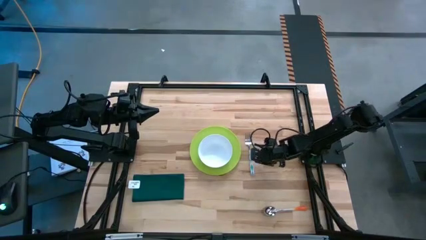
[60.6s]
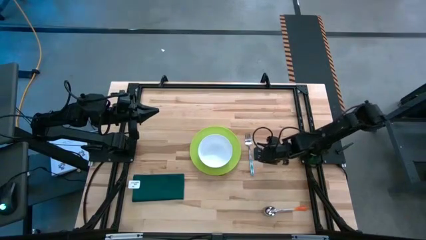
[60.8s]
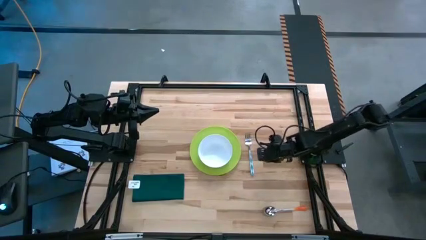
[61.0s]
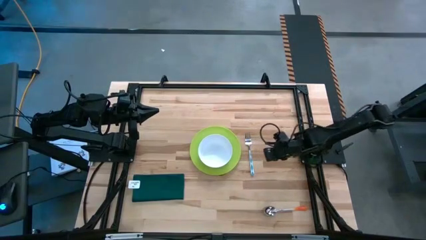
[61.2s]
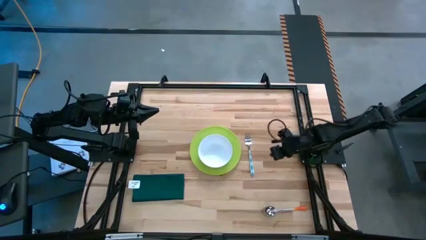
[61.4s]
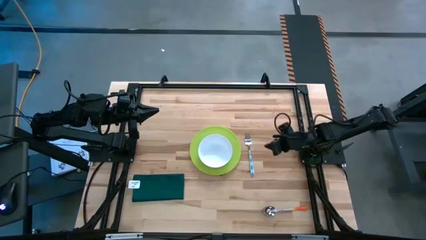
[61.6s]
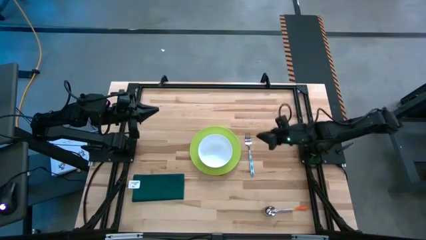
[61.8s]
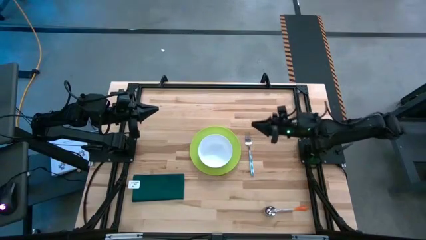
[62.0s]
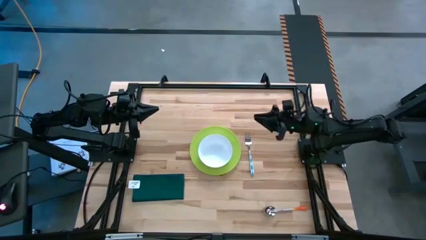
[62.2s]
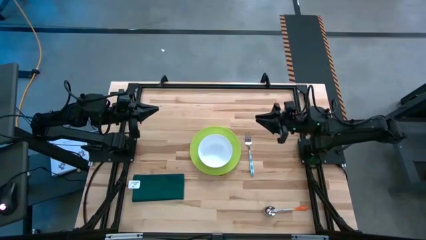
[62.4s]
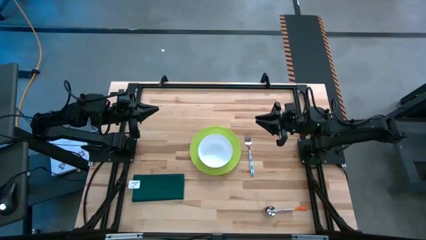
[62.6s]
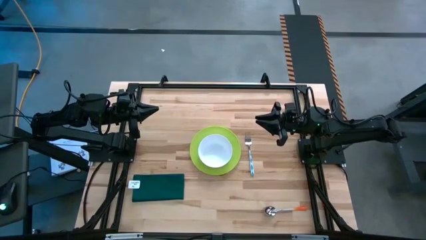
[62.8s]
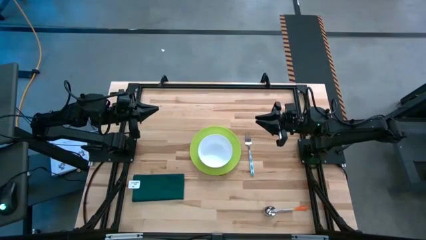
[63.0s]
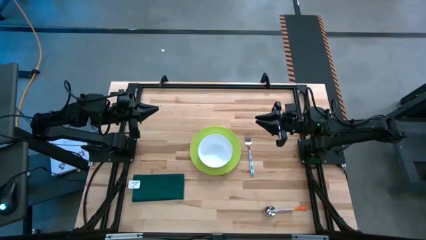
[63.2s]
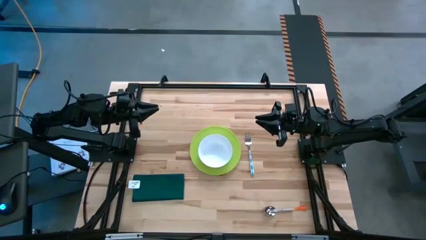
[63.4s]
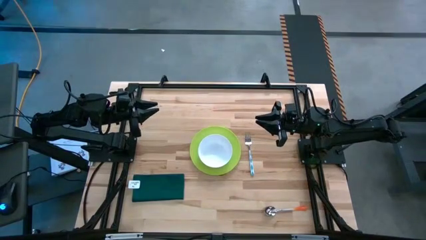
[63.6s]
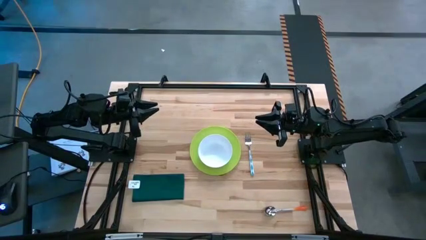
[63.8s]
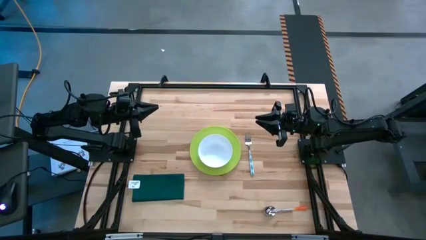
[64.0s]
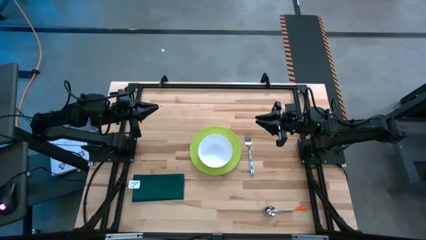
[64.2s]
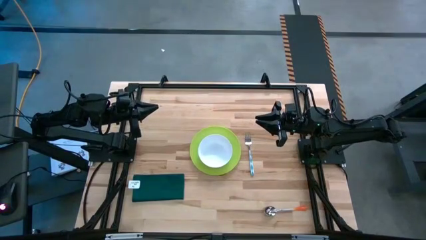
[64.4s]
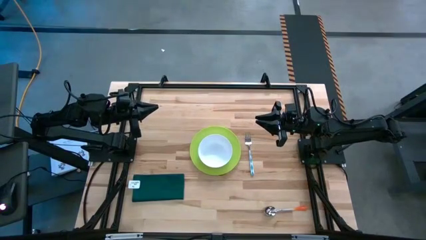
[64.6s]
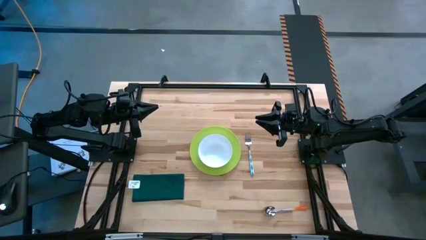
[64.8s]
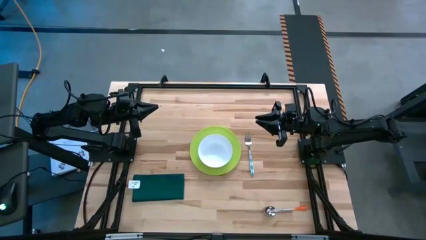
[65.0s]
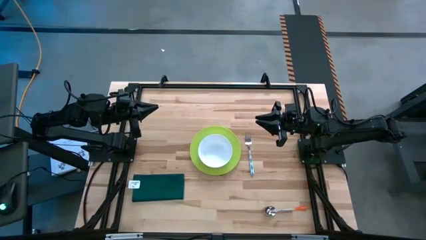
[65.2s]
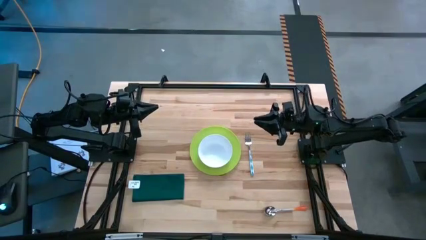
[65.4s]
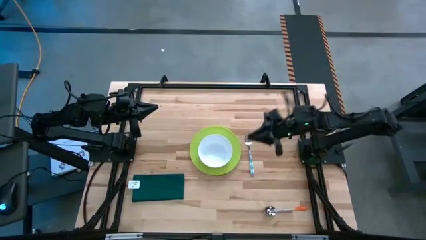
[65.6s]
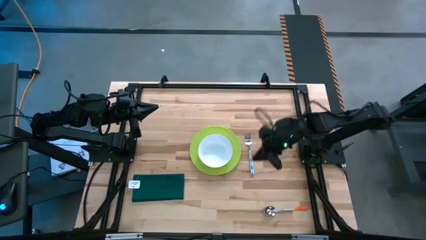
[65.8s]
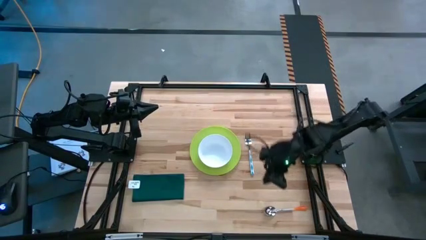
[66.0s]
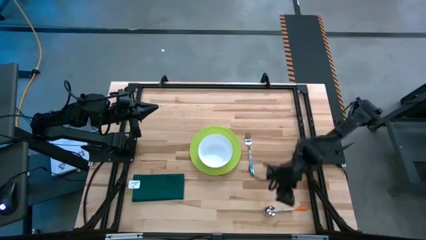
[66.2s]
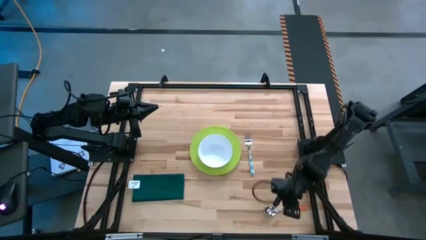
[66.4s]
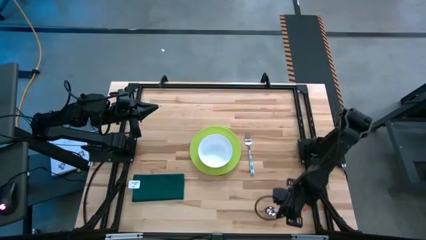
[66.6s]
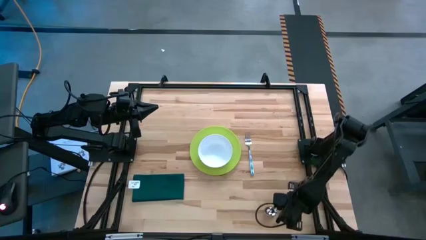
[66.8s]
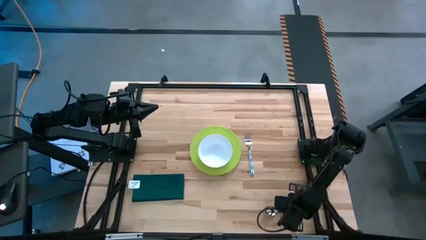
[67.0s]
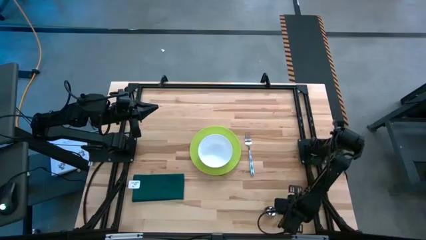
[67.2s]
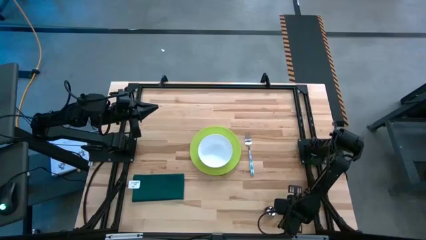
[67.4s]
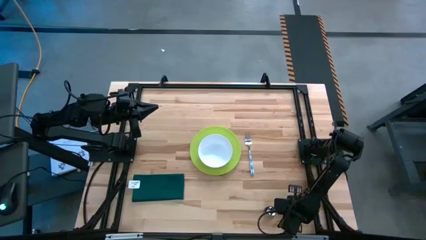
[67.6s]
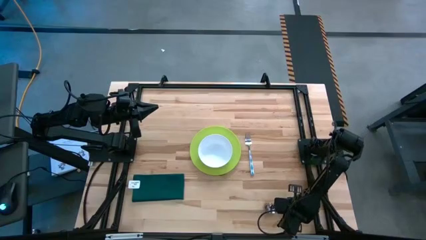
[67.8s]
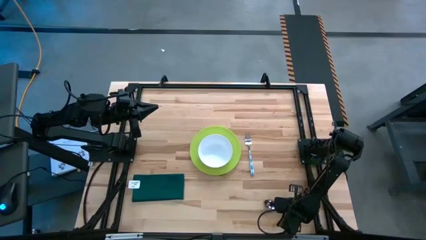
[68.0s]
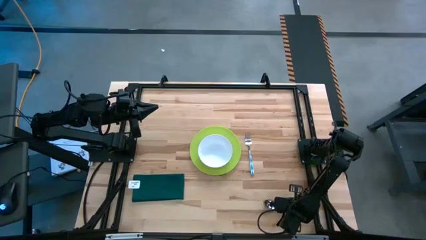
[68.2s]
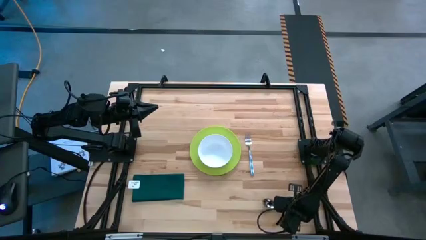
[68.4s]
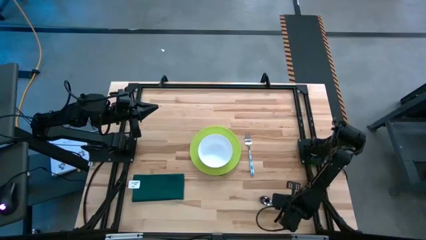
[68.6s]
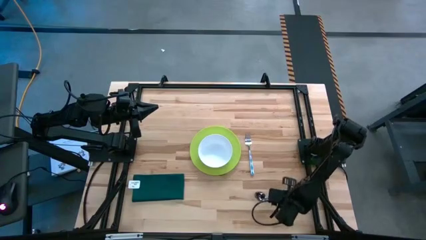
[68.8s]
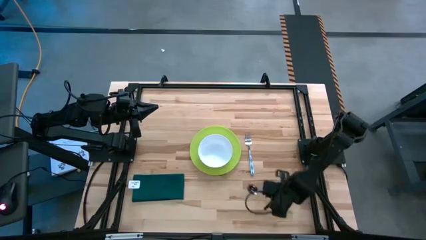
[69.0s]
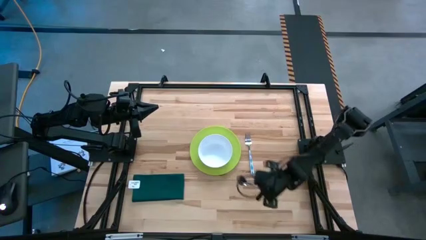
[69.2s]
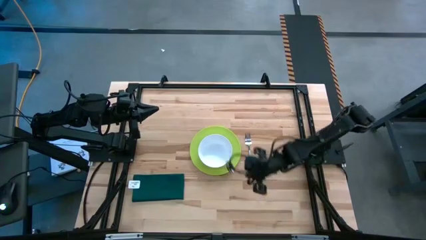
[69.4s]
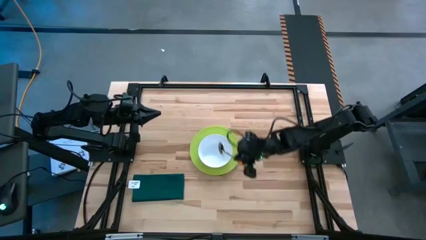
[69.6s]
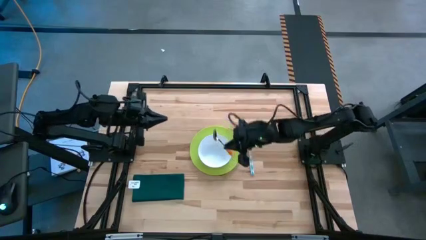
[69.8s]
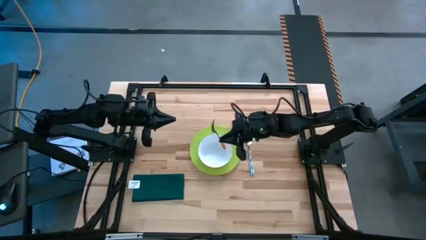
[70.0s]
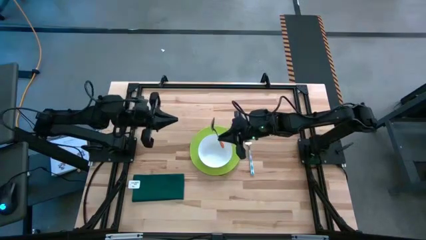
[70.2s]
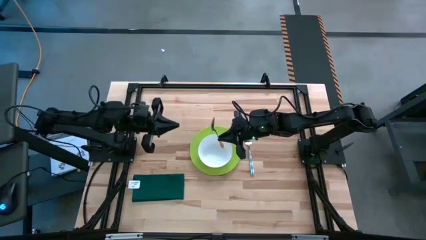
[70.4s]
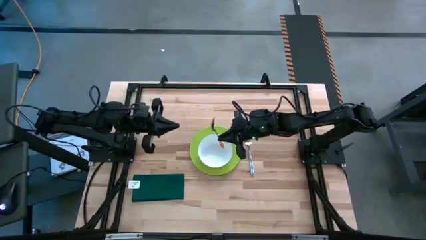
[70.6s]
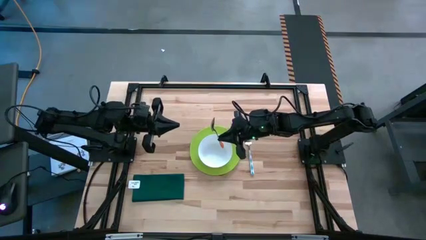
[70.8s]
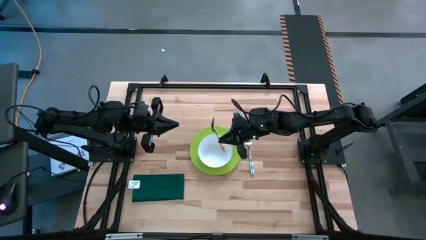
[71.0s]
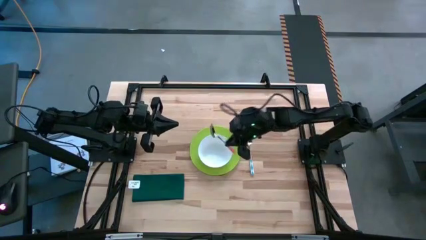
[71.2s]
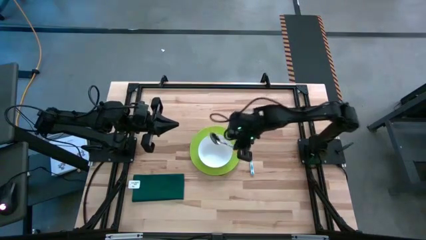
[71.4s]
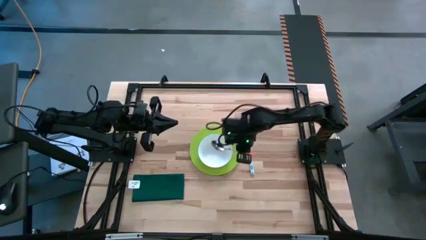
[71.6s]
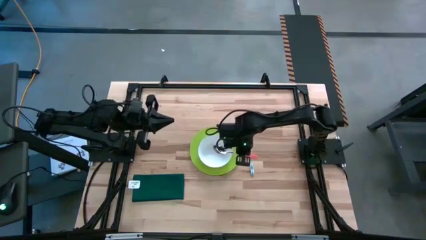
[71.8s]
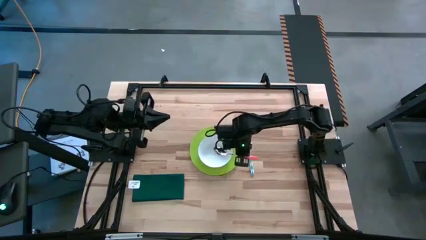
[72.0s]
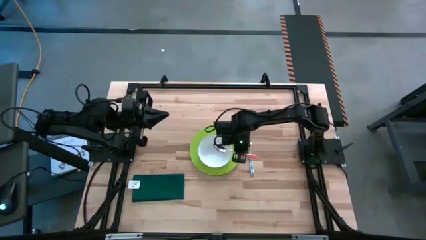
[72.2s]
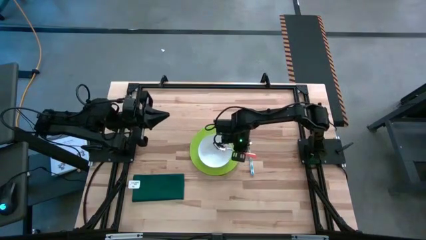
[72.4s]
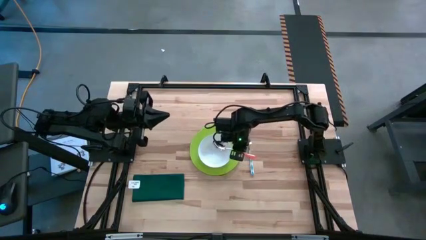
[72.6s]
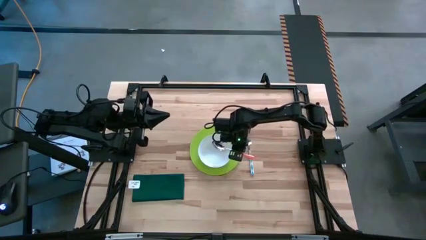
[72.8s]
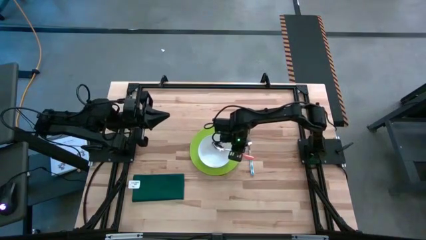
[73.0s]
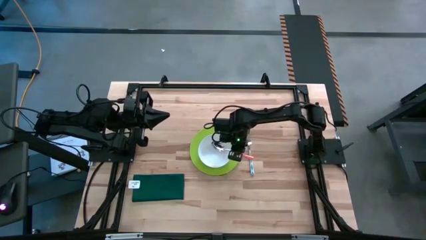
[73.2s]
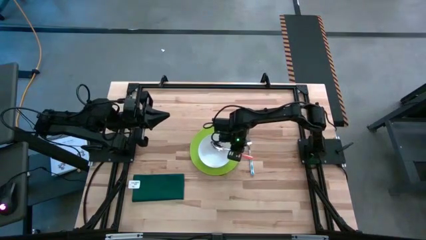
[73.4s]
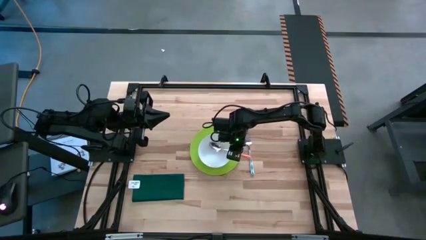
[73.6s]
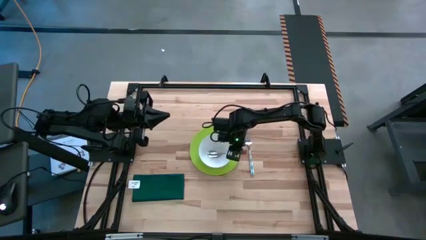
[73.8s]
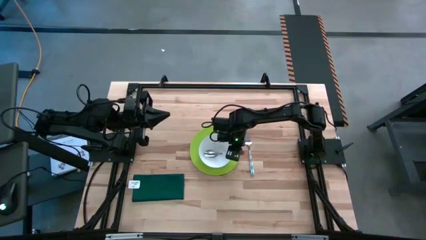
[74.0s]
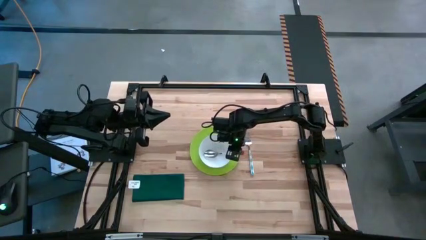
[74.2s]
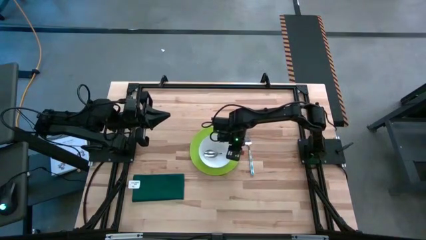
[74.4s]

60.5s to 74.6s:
Task: Set table place
Put the orange spoon into the white bowl

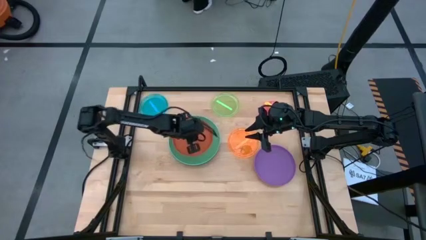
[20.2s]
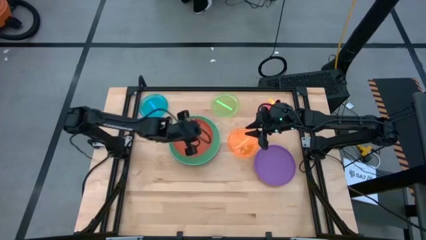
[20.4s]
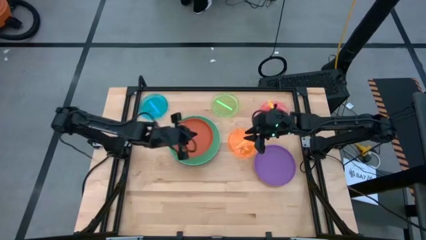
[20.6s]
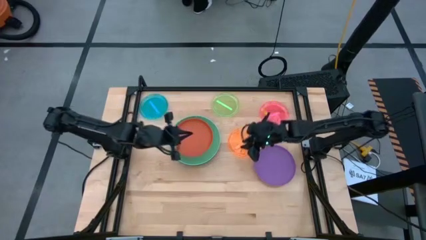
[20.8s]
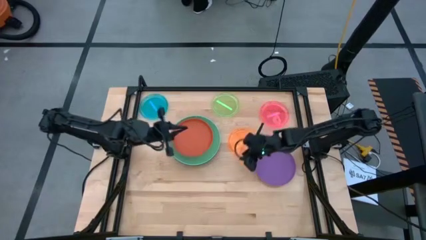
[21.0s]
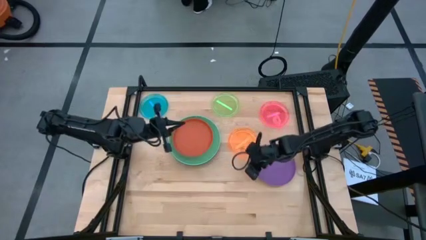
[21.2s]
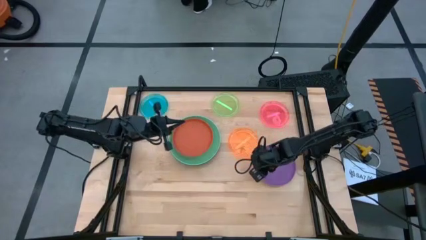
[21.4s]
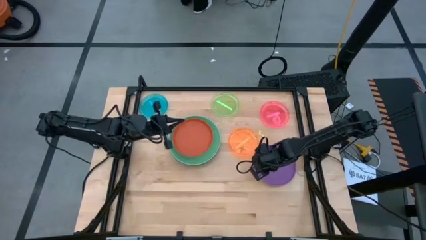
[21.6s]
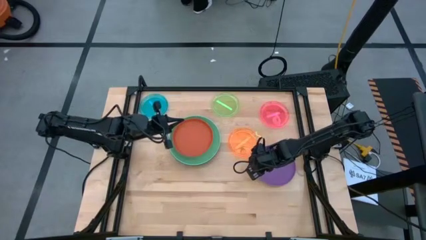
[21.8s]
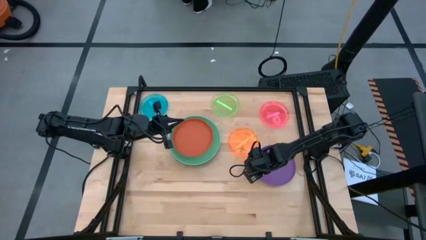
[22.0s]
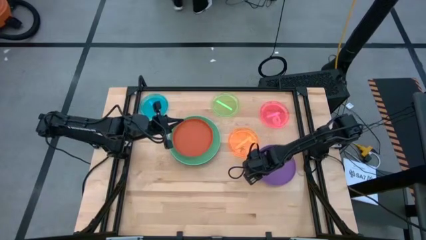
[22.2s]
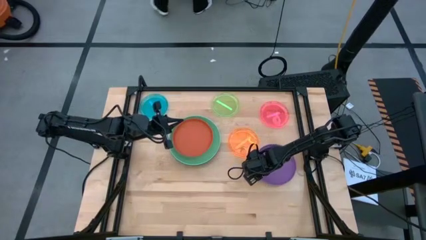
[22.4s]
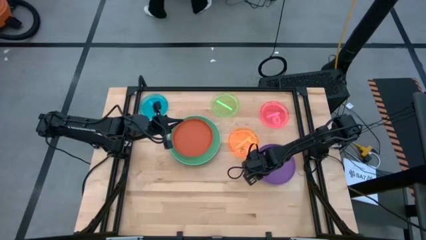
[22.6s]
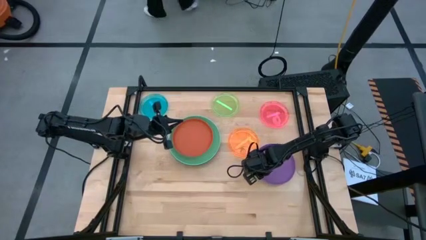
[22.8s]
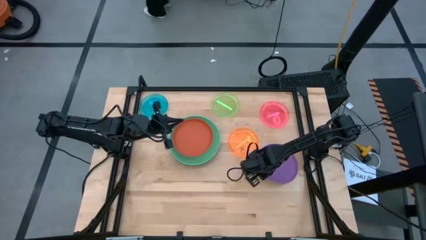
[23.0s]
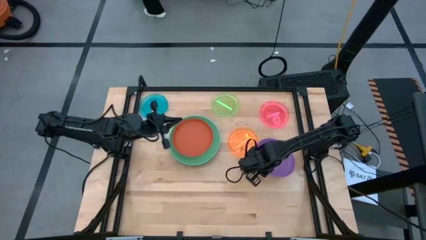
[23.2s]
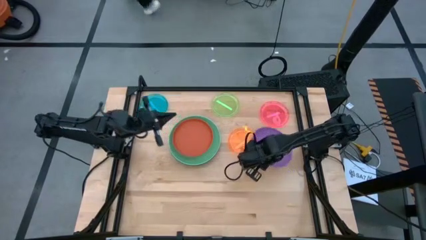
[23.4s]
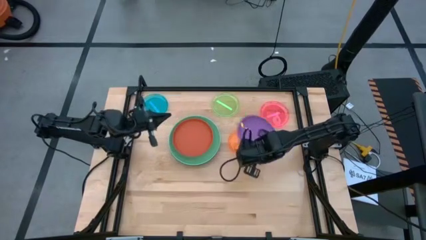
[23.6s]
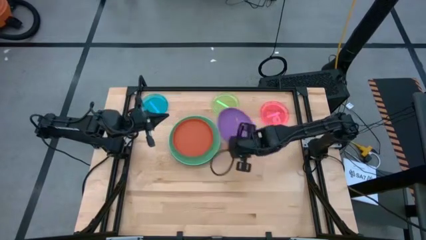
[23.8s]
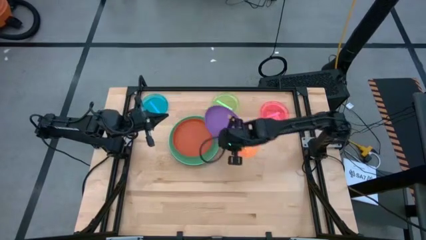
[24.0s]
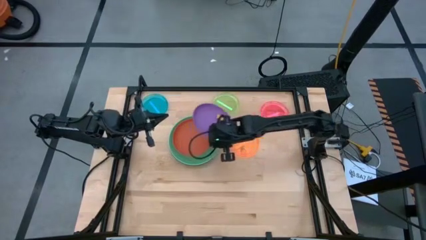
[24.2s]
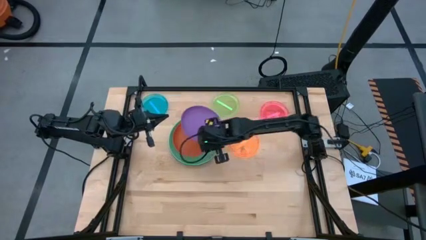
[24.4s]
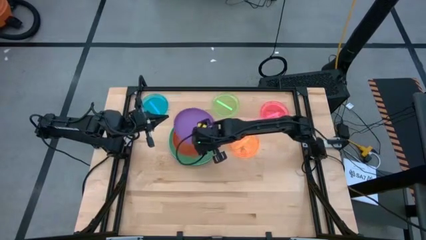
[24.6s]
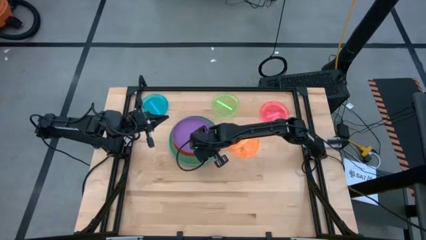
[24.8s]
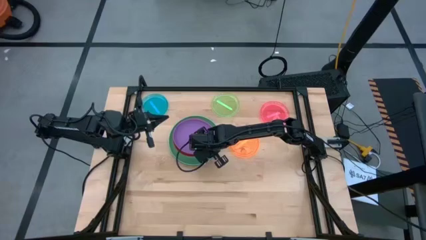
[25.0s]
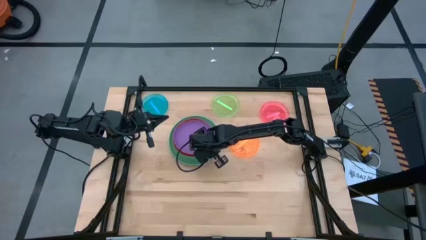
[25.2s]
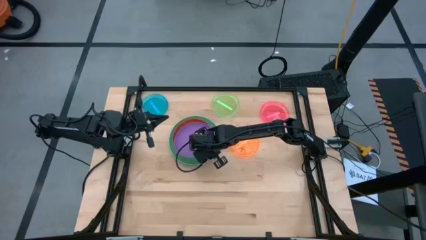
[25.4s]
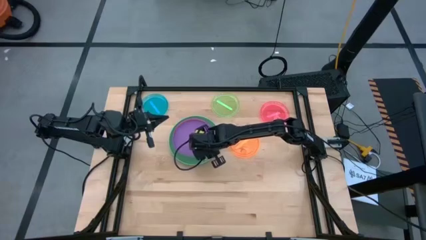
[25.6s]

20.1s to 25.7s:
Task: Stack plastic plates
Stack the purple plate on top of the orange plate
